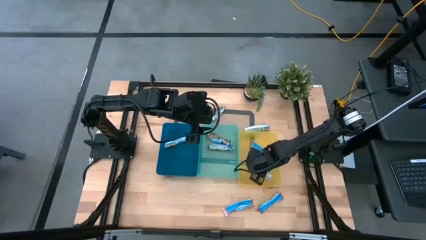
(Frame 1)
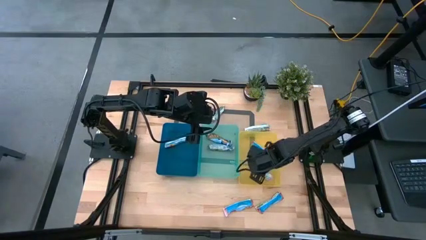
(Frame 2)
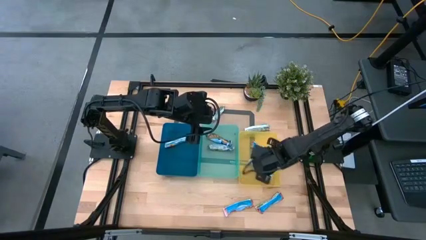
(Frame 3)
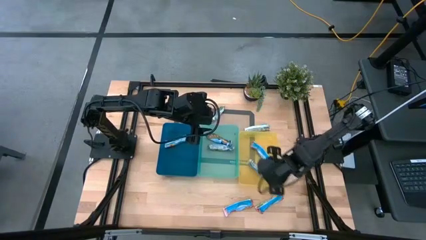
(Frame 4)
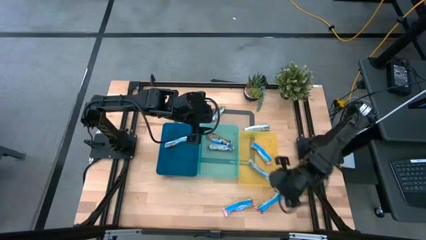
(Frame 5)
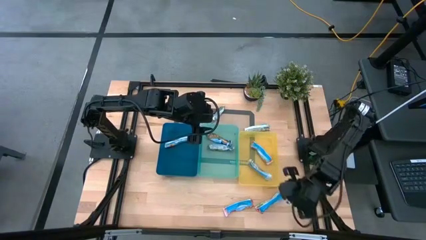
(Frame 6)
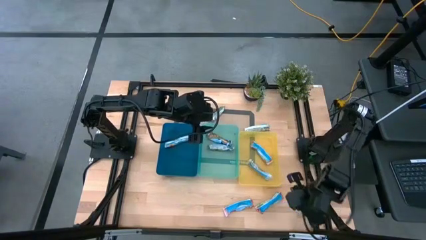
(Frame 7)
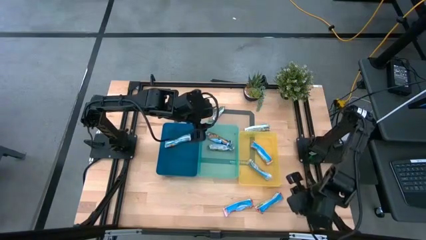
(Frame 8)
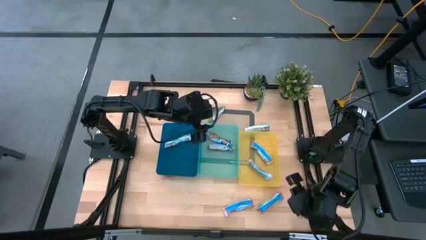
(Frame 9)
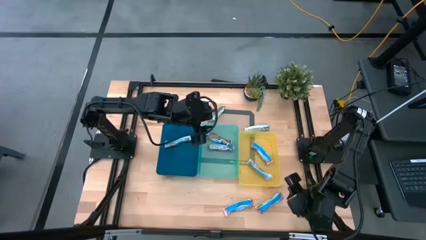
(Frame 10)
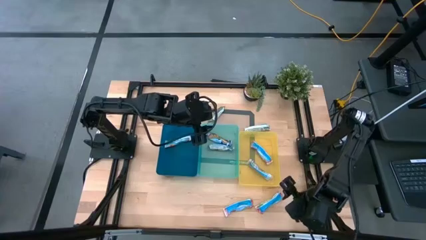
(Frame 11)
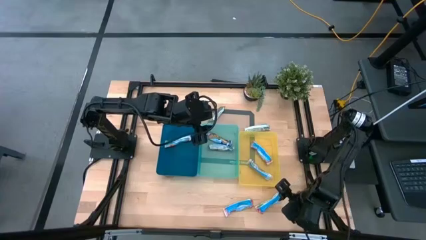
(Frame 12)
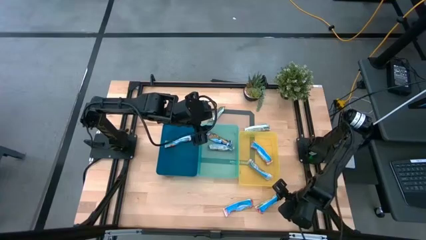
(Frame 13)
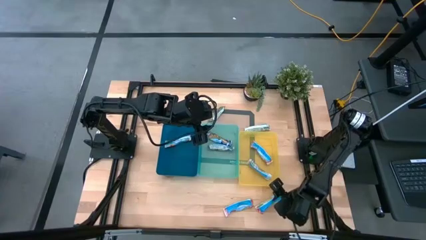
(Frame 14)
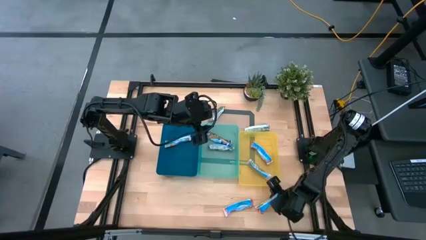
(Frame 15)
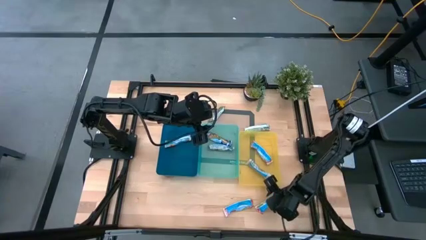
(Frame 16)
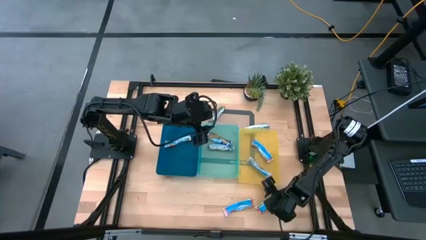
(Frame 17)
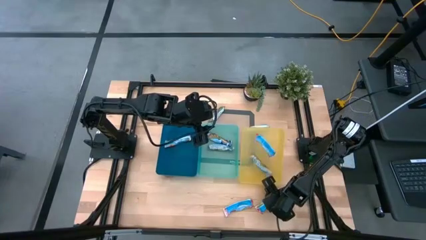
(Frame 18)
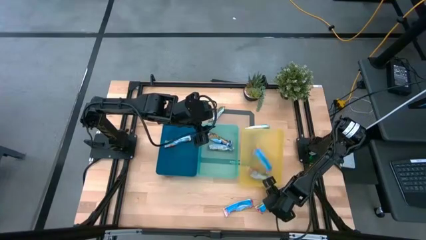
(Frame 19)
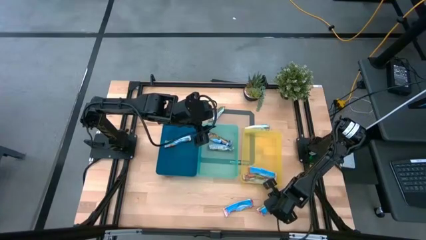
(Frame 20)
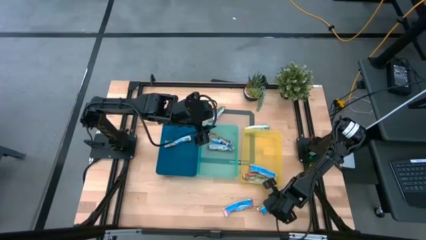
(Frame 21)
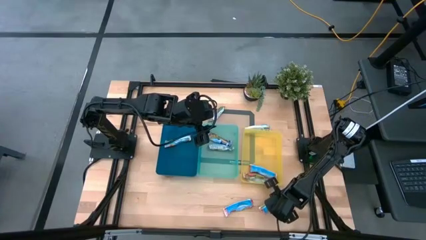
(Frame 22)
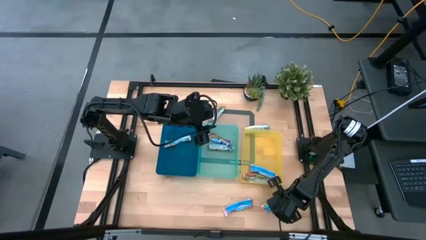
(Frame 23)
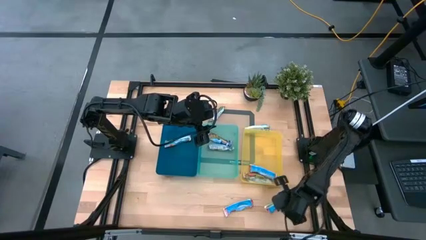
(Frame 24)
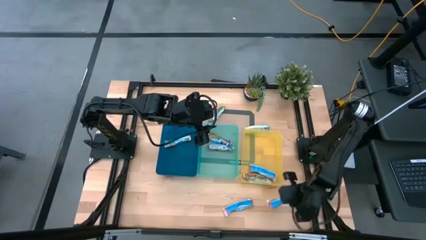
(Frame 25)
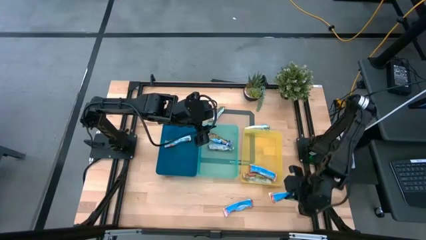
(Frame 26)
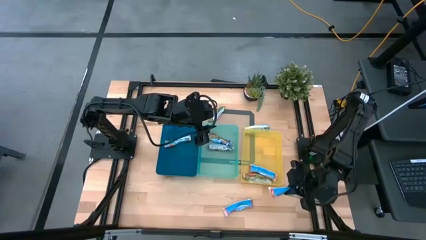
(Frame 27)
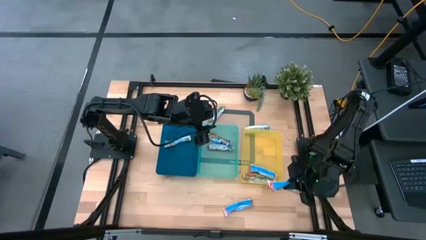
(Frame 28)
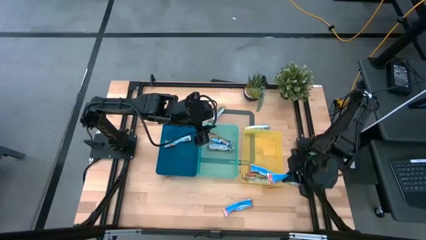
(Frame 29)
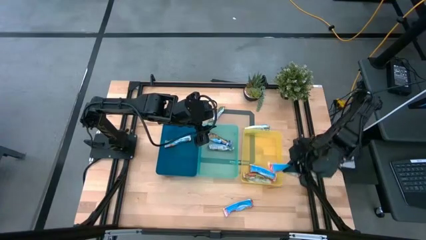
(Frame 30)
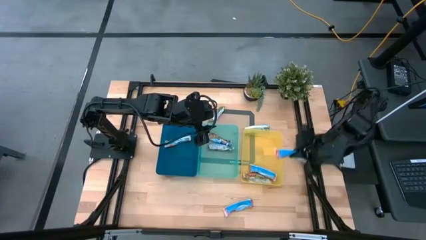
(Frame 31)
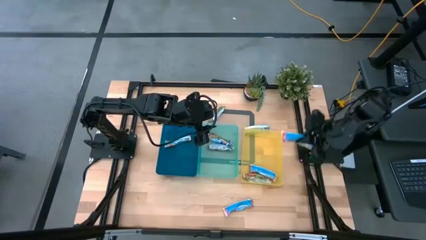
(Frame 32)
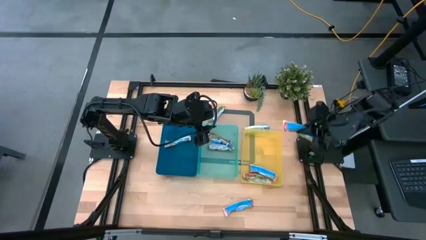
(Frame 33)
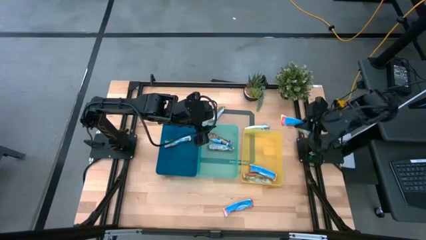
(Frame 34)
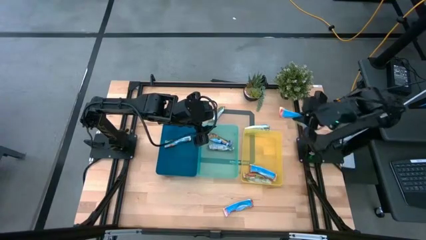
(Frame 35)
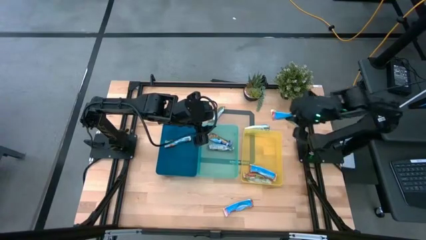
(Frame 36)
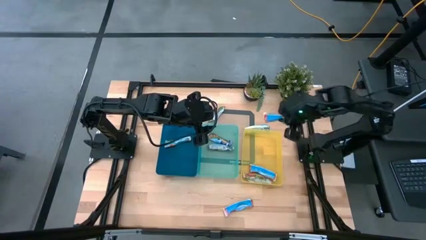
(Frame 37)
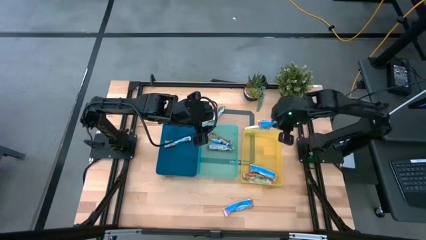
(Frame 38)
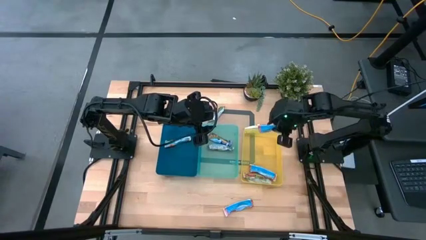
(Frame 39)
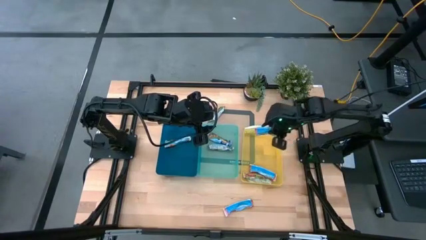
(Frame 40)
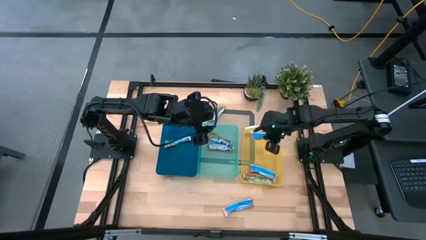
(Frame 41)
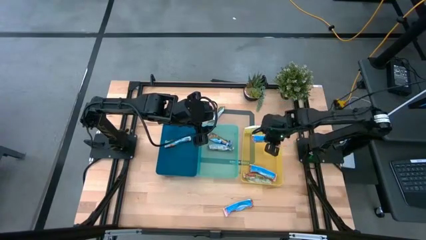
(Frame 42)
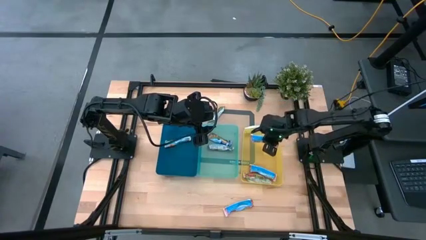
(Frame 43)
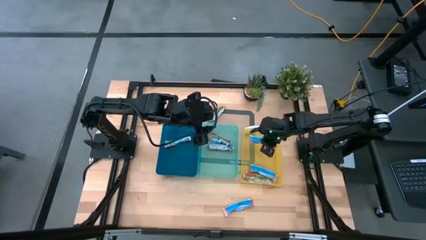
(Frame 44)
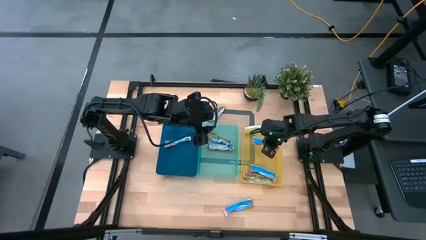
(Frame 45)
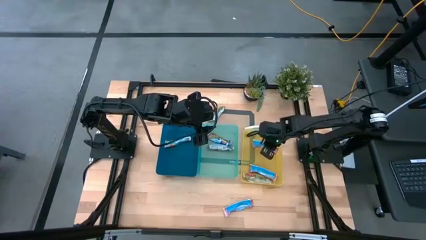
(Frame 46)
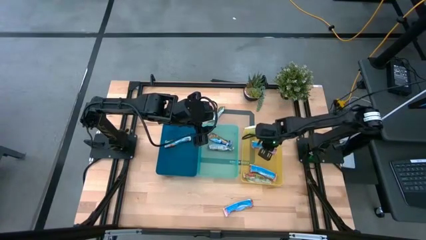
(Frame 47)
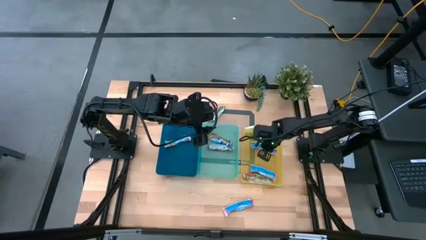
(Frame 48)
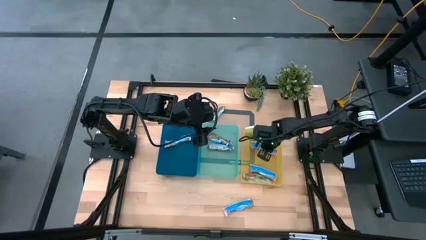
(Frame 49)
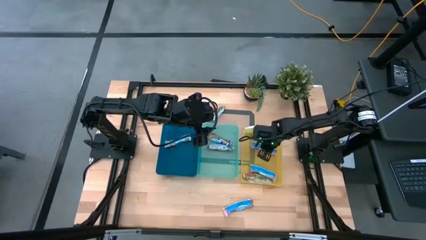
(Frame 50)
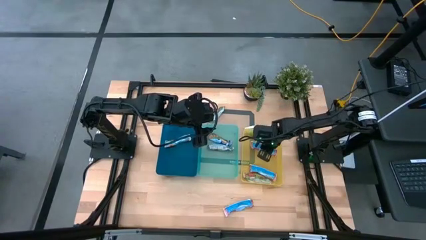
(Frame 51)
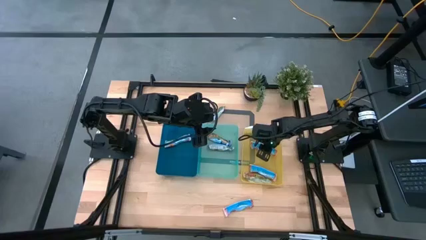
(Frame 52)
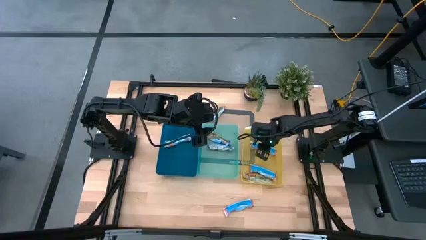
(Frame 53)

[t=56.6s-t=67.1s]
Task: Pick and place Granola Bars by type
Put the right red granola bar into the yellow bin

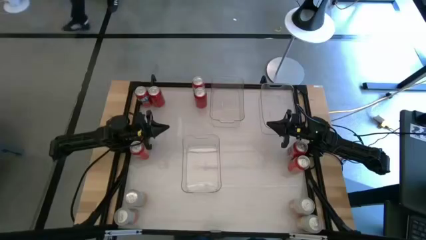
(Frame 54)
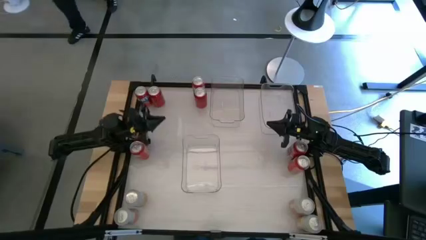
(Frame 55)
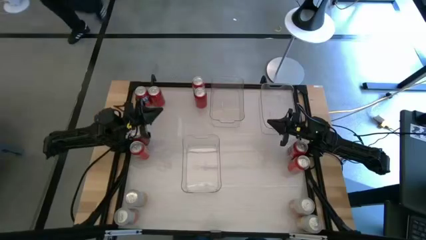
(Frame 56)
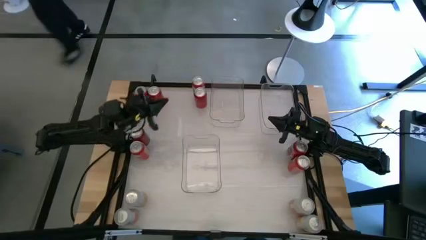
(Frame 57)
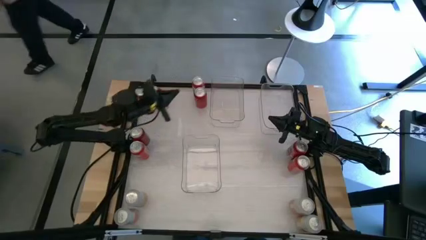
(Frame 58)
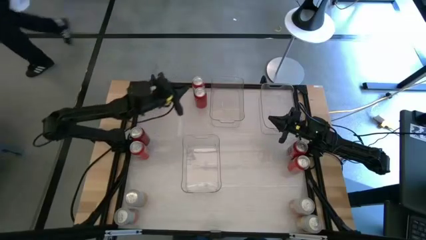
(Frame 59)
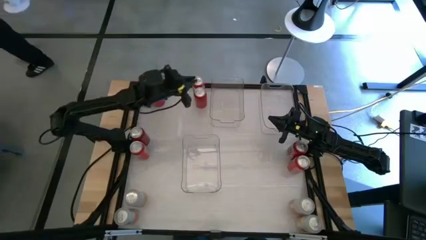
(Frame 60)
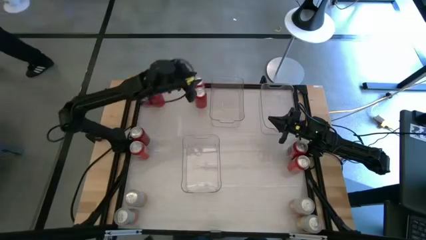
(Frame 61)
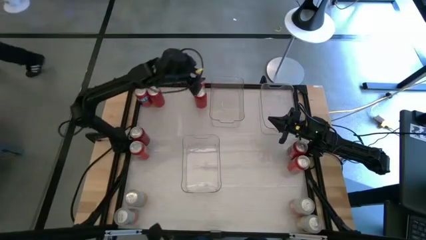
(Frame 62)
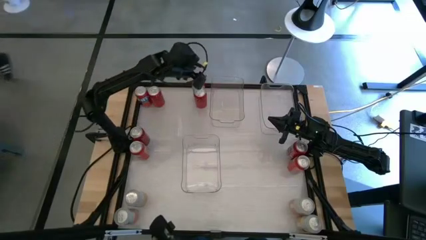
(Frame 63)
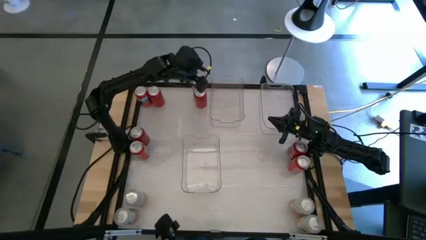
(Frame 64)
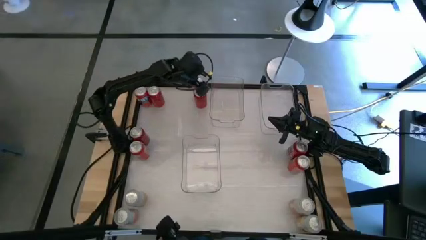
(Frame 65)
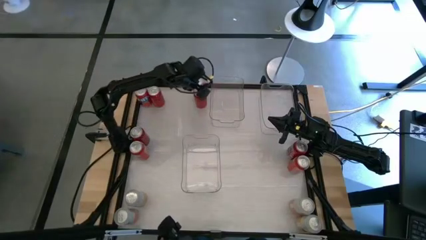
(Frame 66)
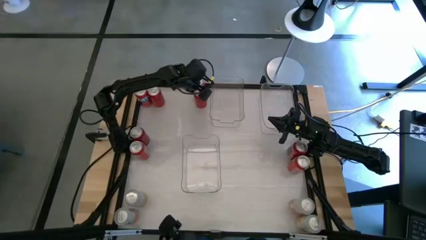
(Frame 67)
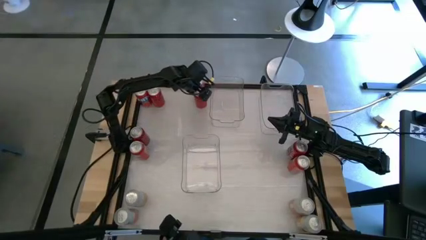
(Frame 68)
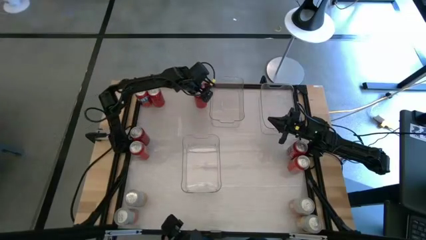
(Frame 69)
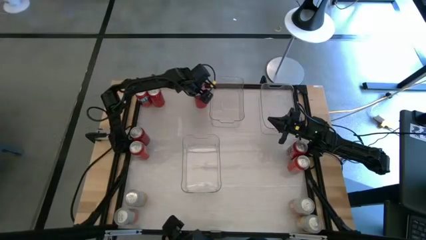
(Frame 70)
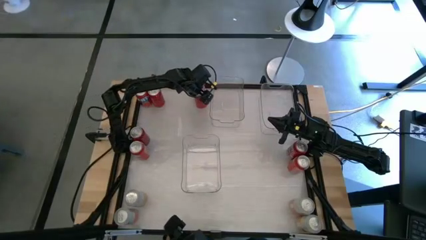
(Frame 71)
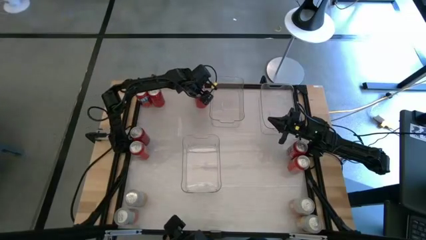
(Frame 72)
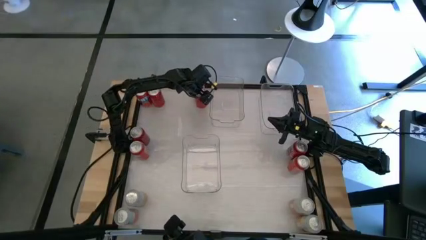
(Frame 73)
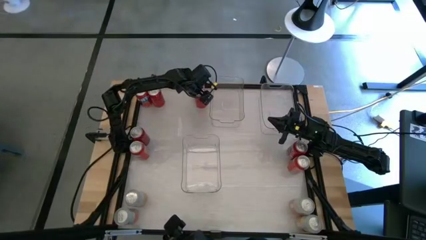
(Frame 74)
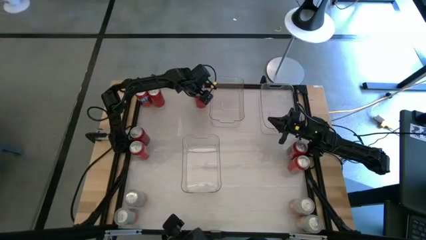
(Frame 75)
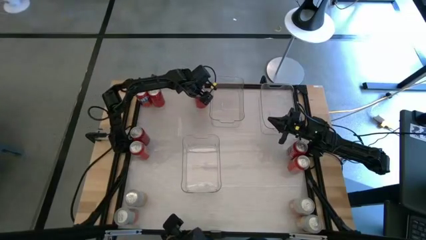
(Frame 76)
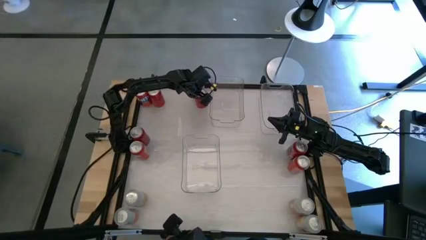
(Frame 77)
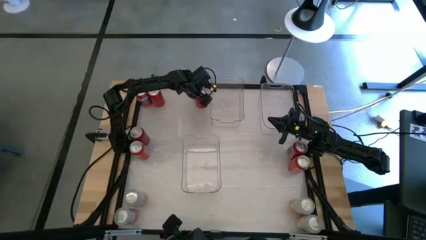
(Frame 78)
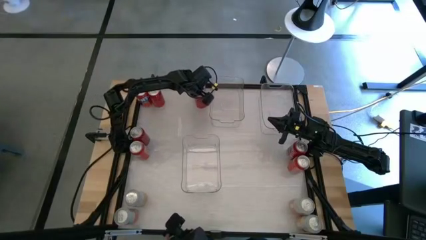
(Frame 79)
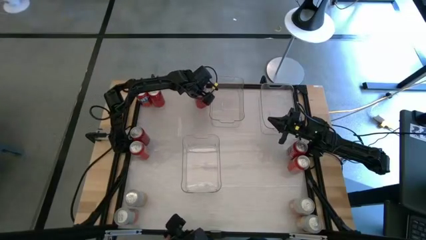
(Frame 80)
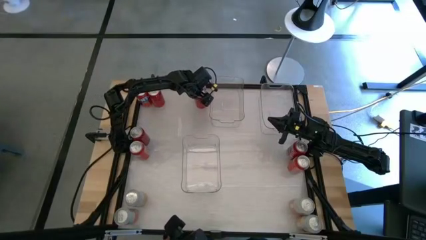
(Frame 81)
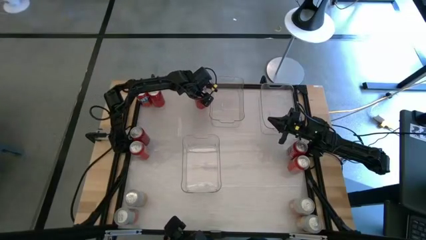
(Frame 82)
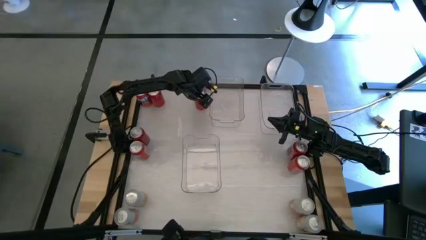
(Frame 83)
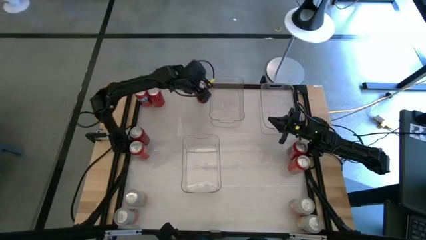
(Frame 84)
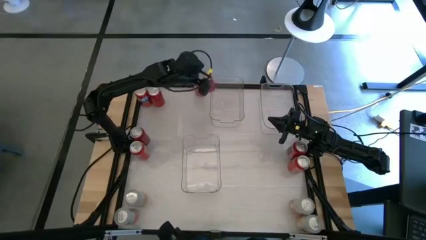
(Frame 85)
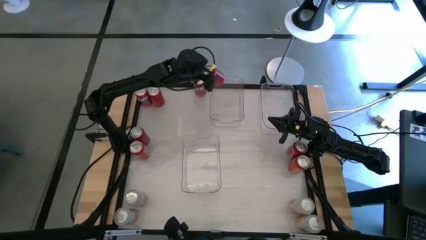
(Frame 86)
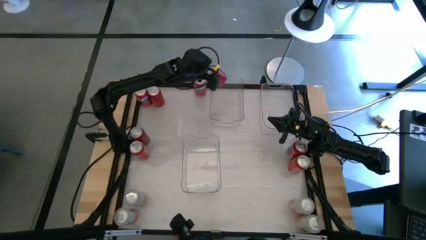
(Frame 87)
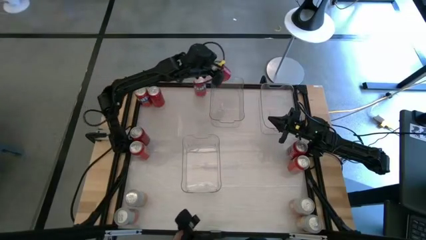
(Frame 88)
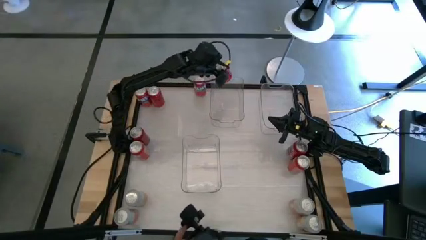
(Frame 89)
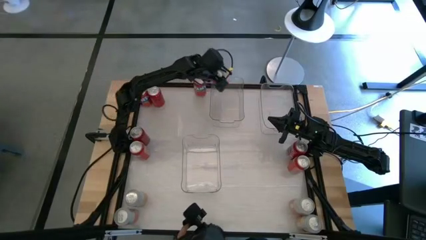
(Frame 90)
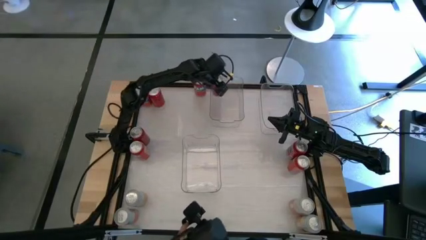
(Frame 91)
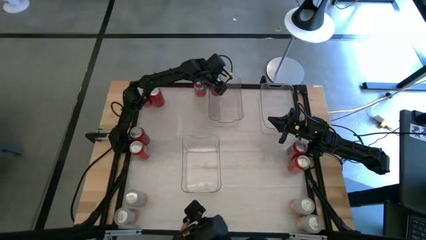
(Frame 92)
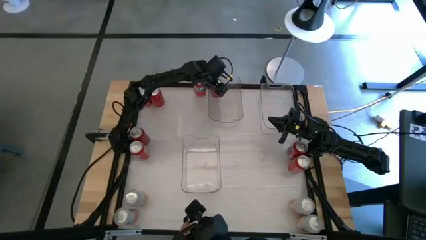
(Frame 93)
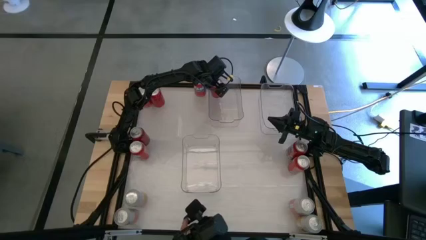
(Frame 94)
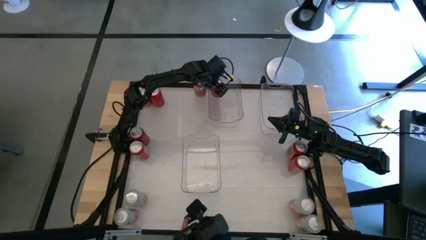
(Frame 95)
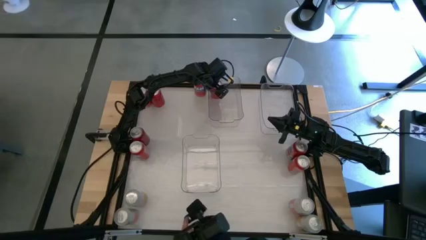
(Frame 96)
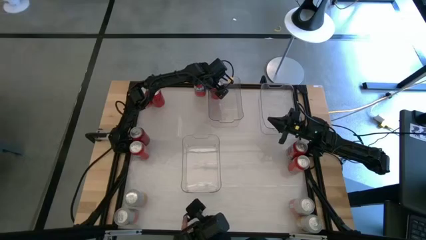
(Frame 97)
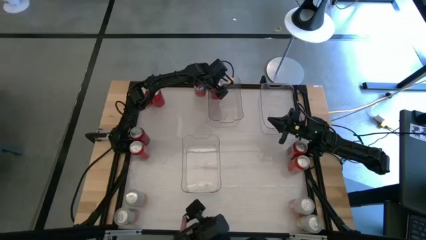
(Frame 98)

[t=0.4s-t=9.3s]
Task: Sort soda cans
Put the top right red-black soda can into the top left transparent bin
